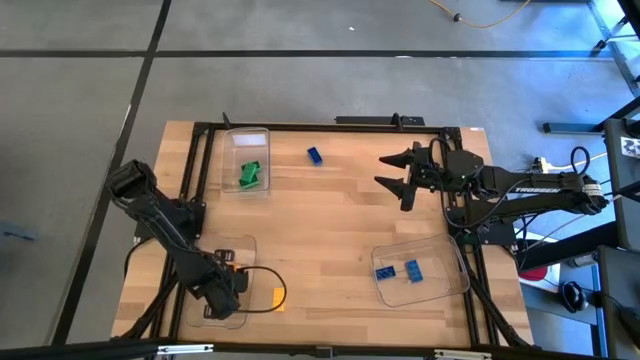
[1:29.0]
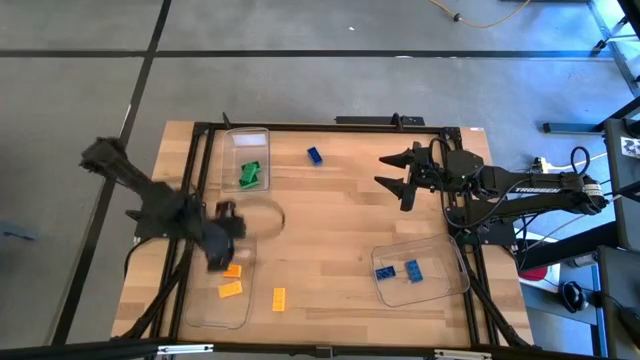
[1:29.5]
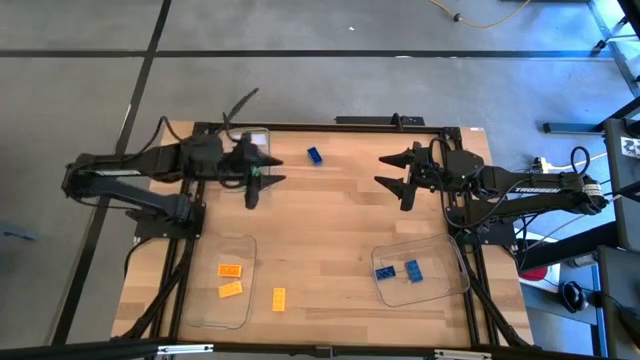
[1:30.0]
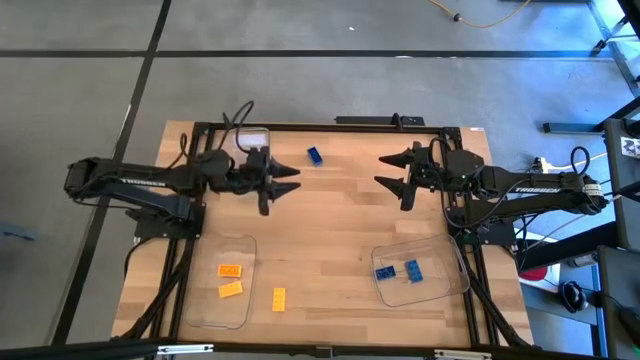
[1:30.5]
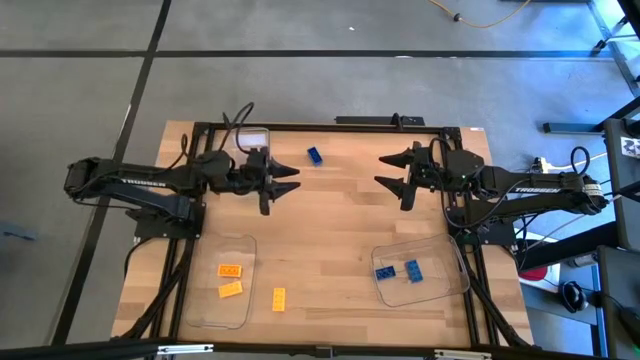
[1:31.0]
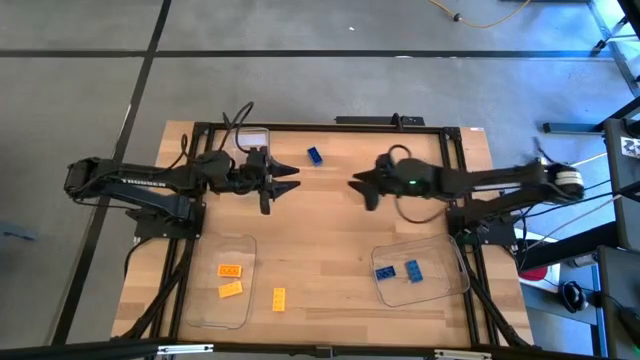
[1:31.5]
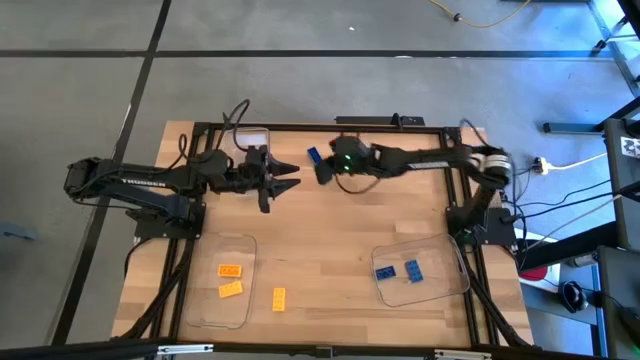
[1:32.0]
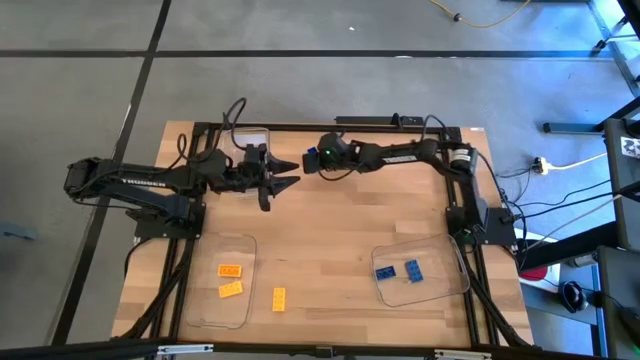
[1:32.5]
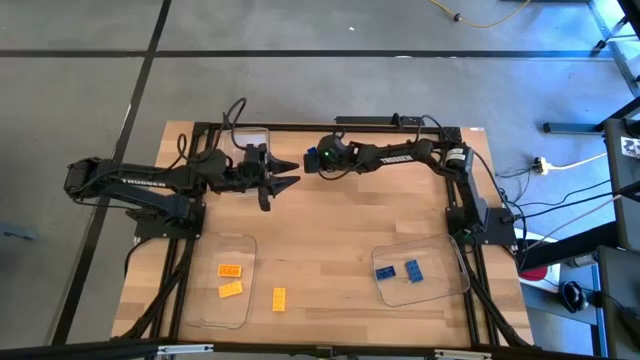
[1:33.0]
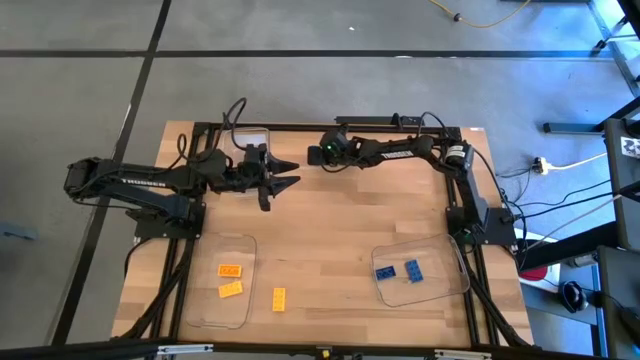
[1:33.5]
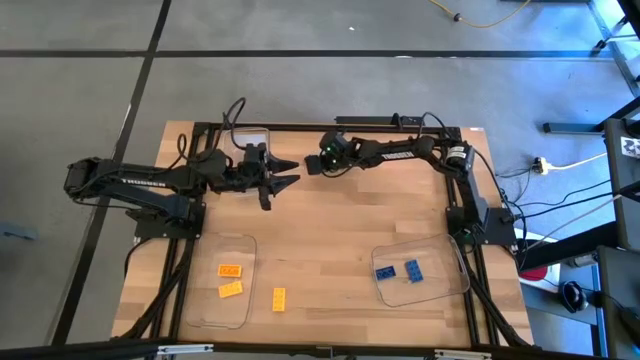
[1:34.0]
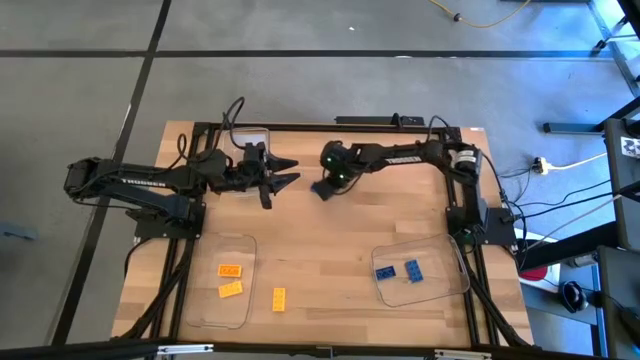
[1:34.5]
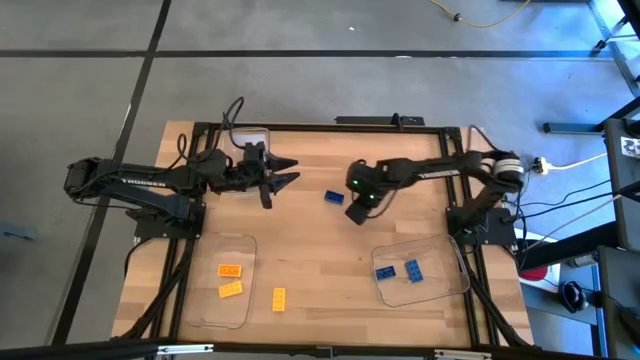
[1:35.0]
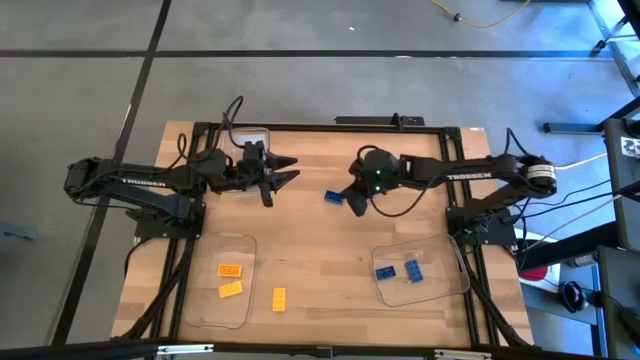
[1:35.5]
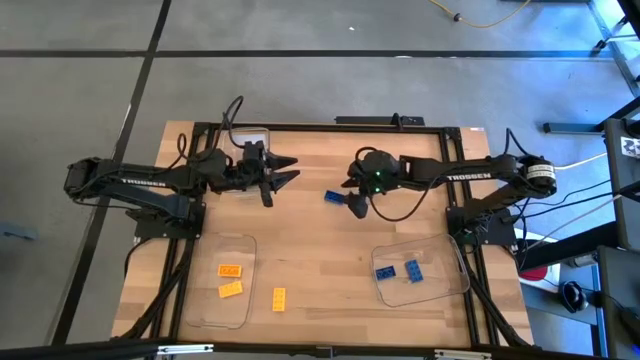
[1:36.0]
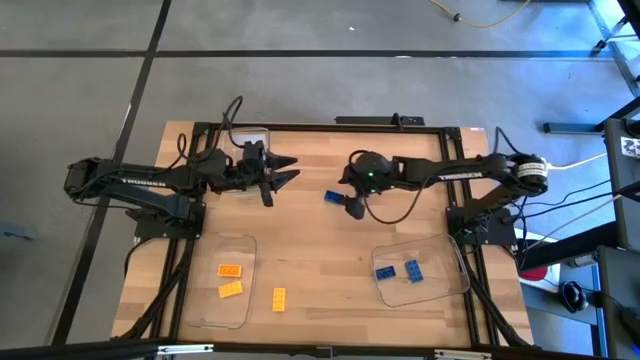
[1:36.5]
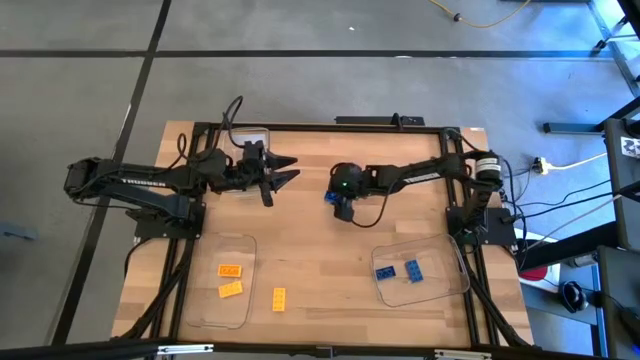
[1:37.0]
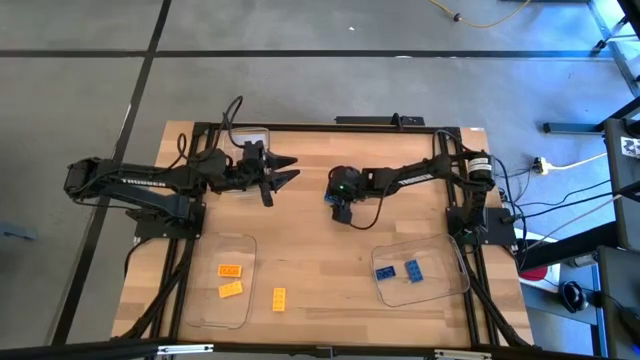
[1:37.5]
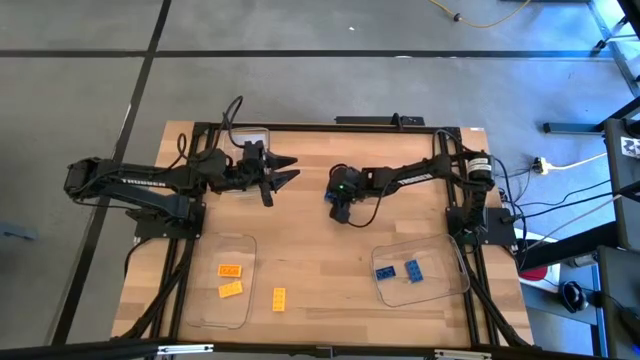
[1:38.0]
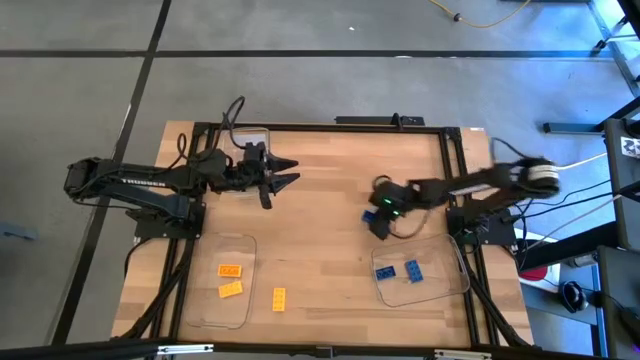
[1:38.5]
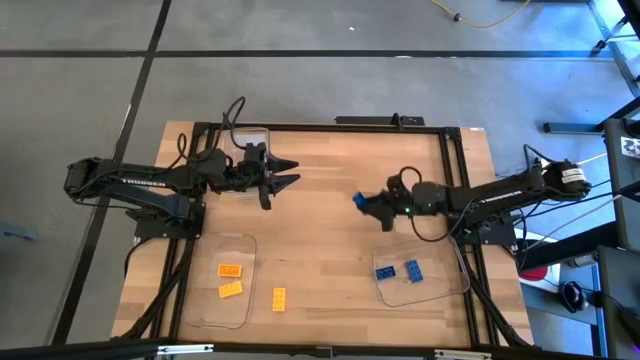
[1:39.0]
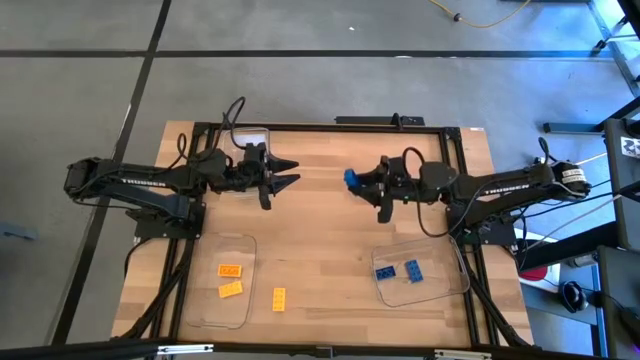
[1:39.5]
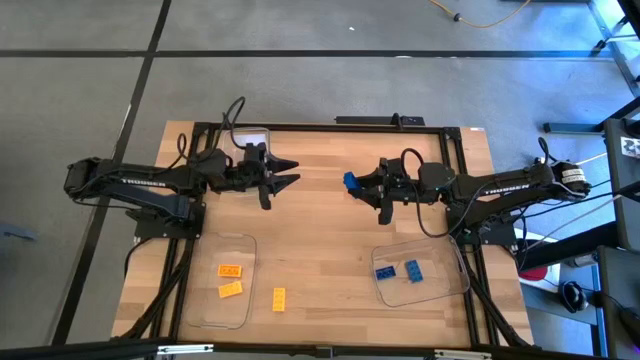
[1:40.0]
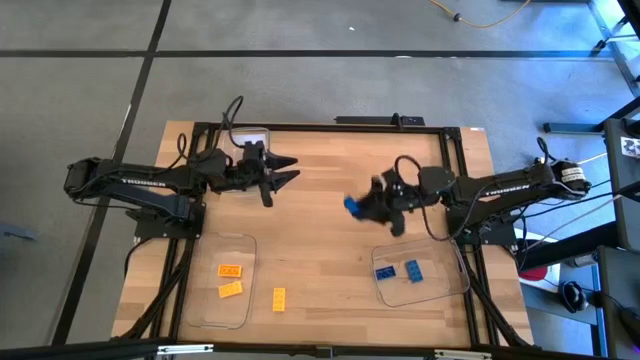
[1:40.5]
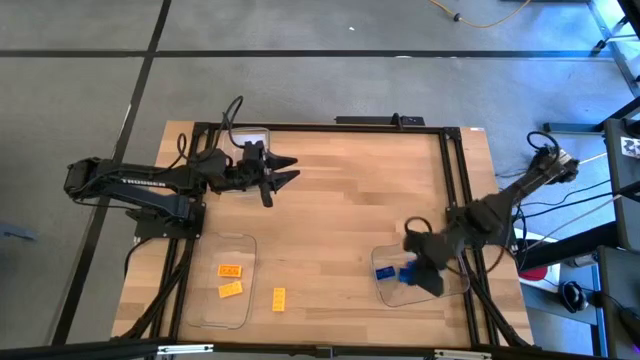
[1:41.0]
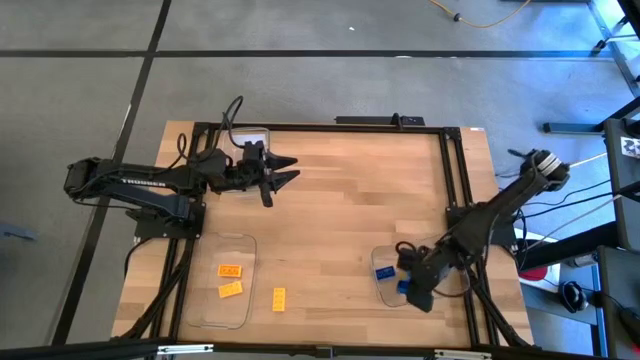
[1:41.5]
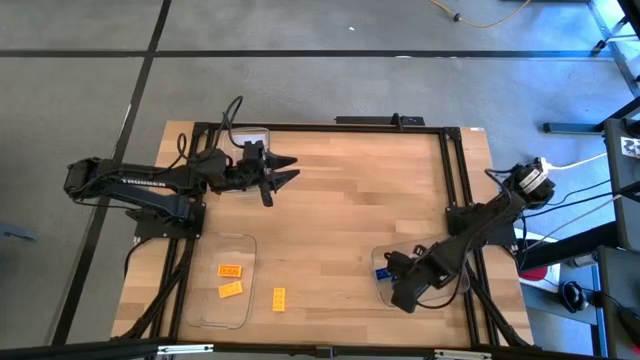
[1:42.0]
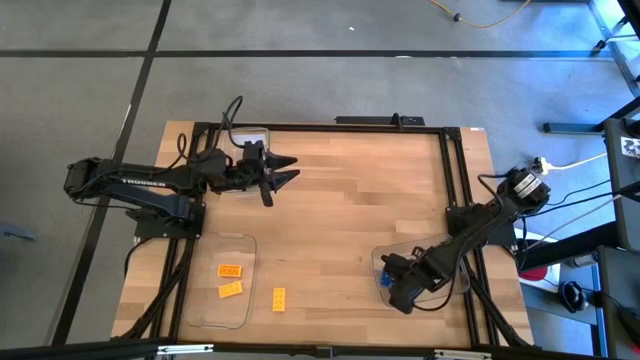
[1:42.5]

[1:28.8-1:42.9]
Task: Sort & place blocks by color
Put the blue game piece into the bottom right transparent bin

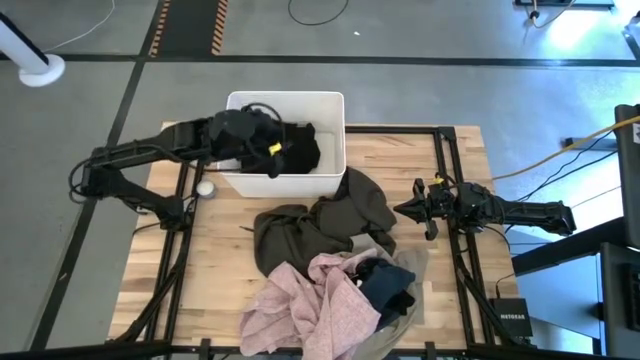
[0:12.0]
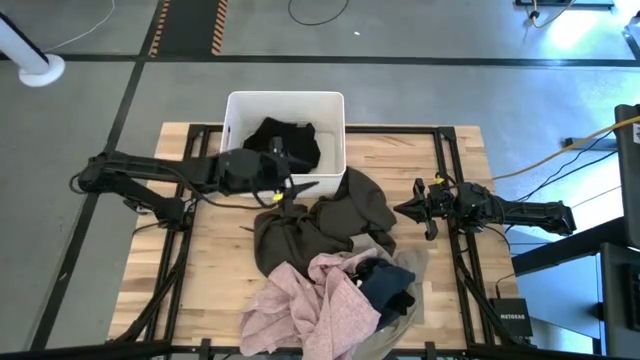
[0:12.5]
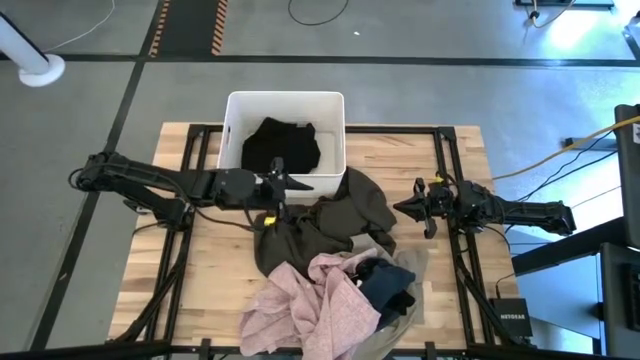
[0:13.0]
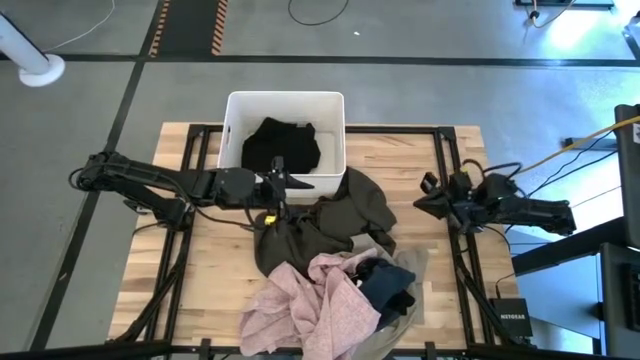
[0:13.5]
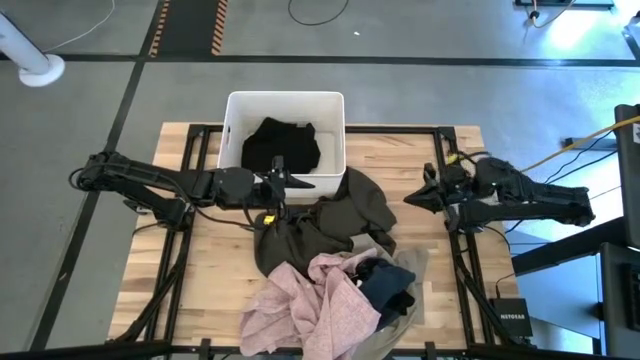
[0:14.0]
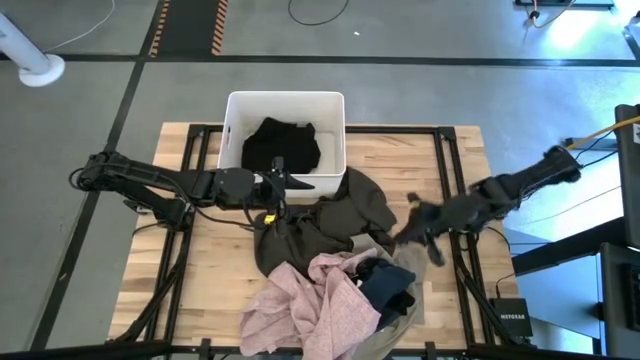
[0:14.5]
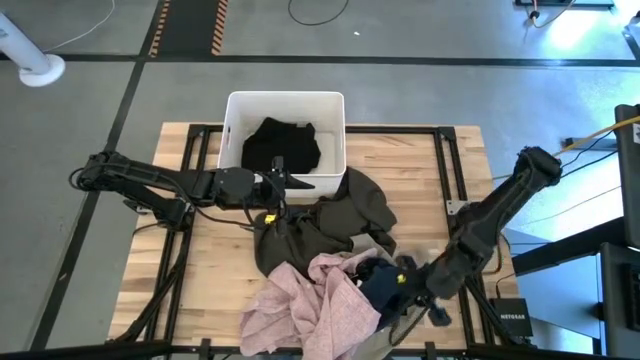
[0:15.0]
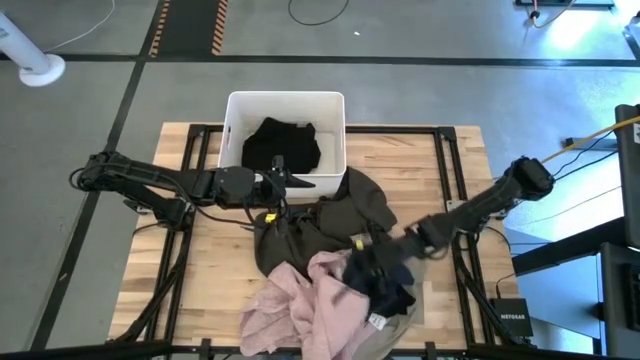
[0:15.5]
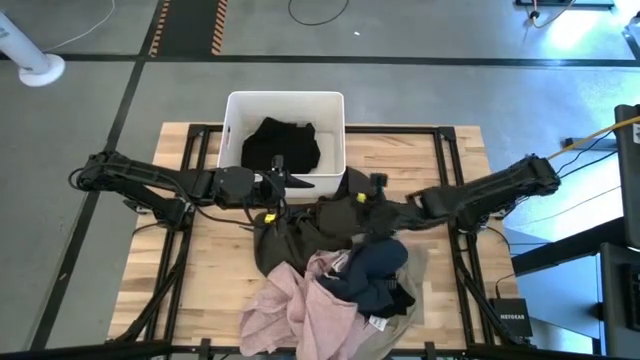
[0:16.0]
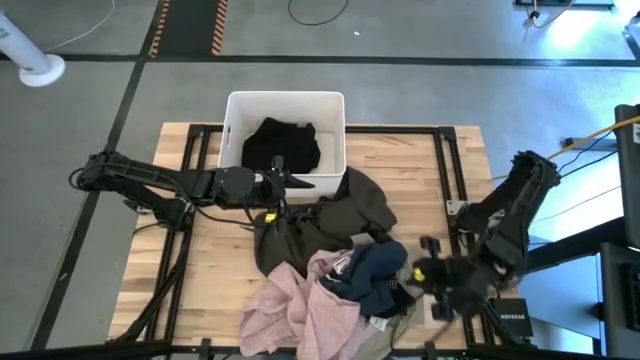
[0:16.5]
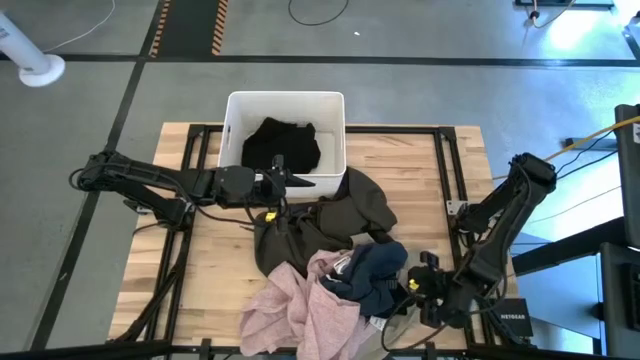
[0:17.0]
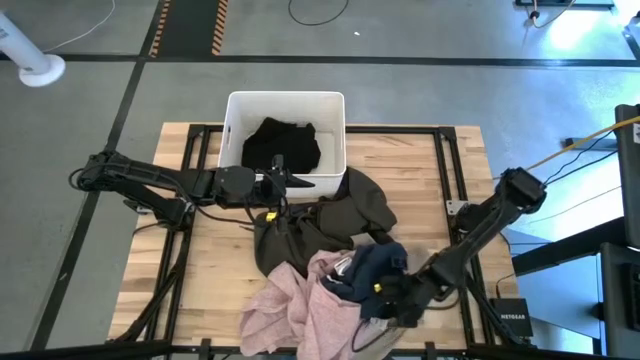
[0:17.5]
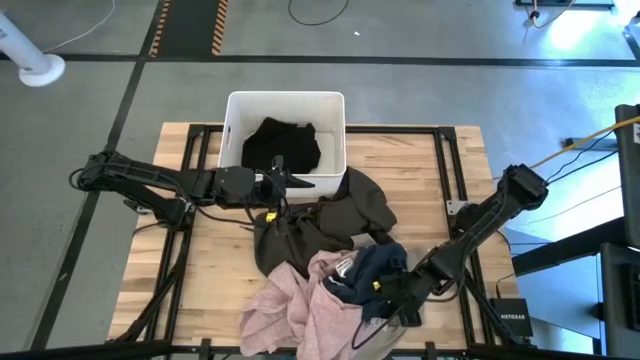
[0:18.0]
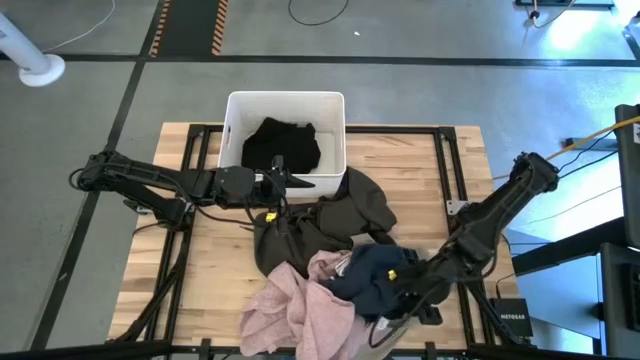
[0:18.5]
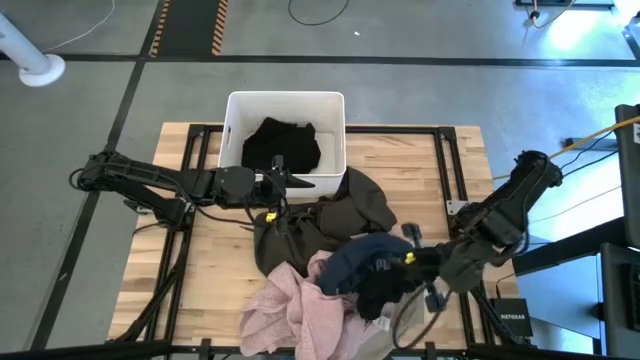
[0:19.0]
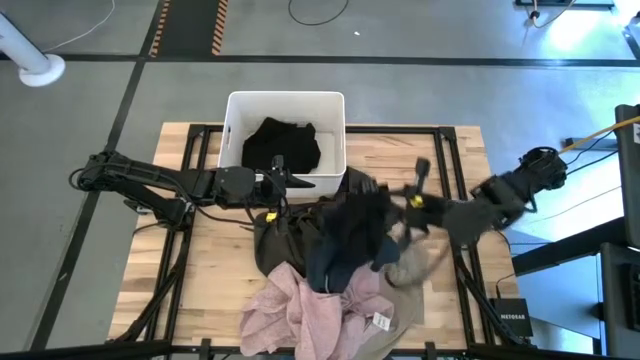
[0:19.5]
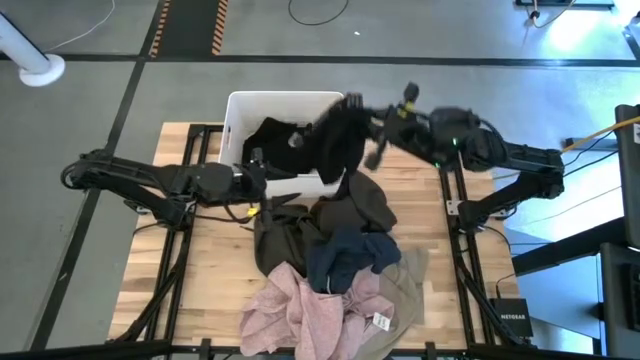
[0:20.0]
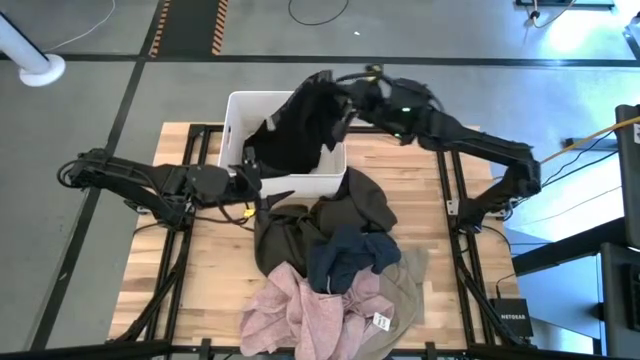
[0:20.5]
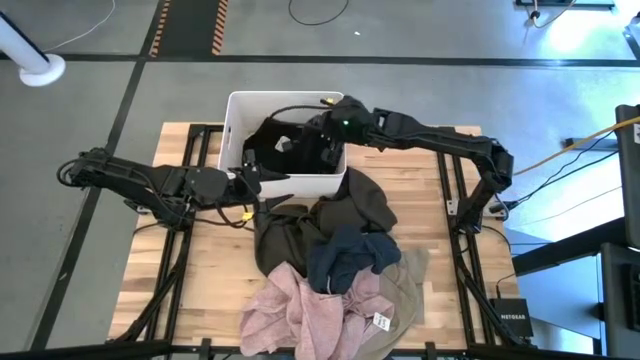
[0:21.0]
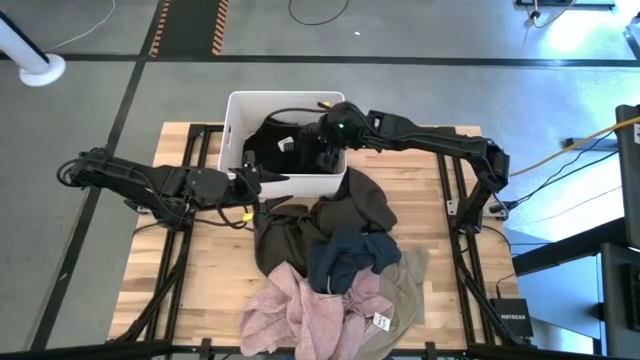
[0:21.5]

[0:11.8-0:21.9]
Task: Sort clothes
Put the black boxer short into the white laundry bin
